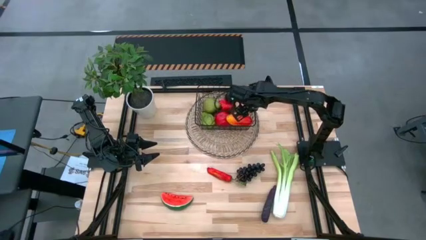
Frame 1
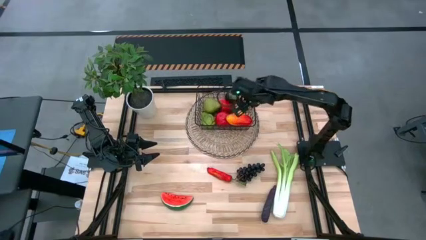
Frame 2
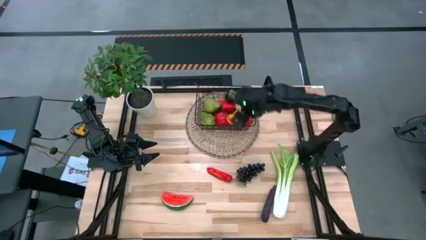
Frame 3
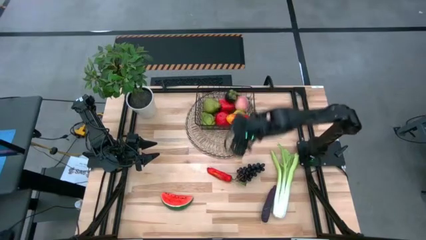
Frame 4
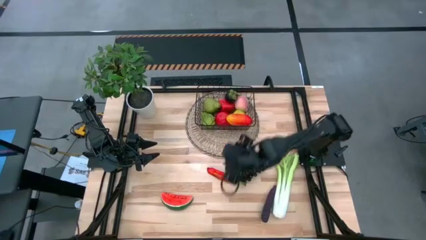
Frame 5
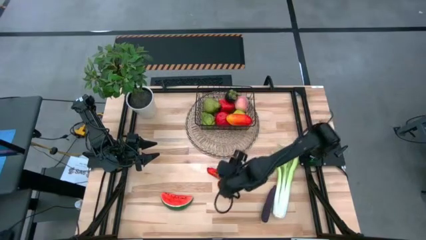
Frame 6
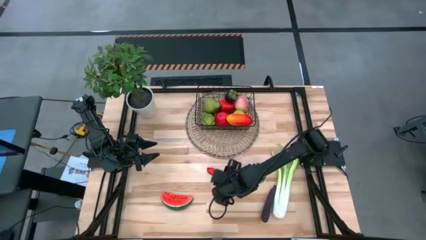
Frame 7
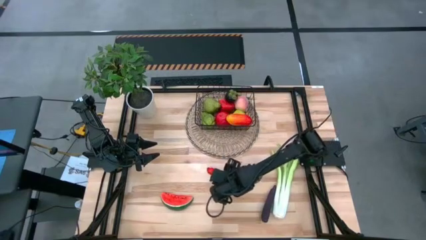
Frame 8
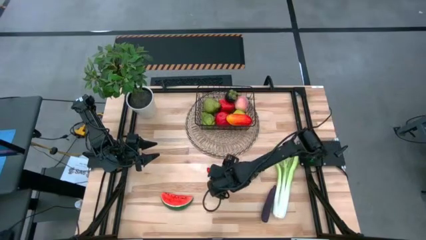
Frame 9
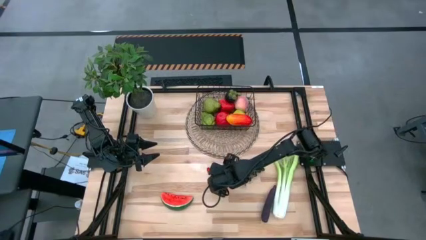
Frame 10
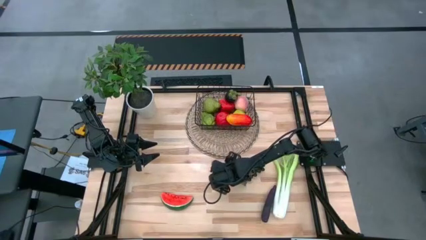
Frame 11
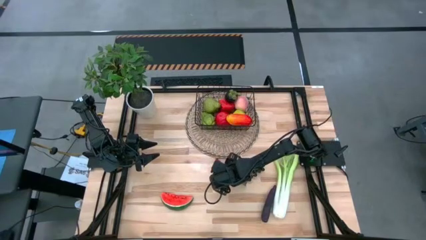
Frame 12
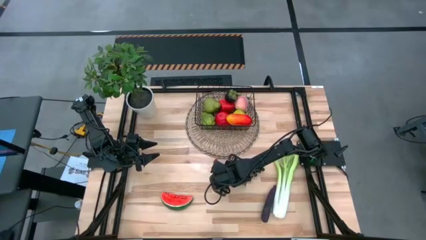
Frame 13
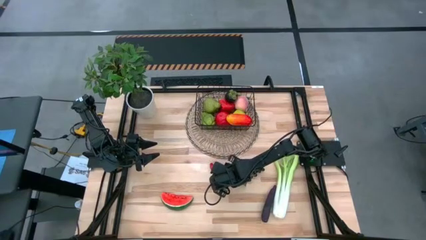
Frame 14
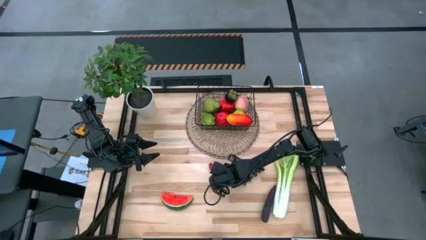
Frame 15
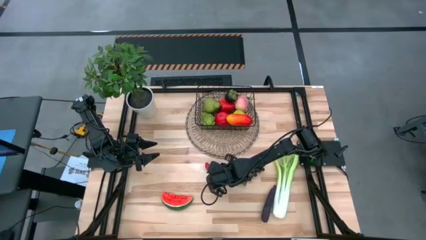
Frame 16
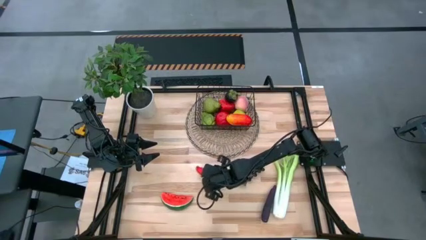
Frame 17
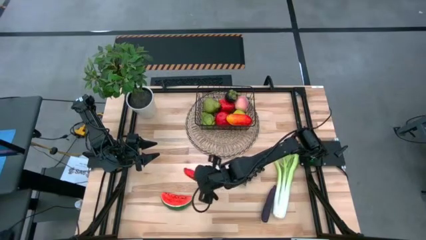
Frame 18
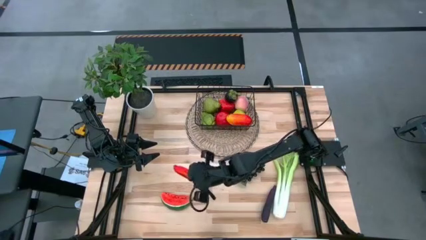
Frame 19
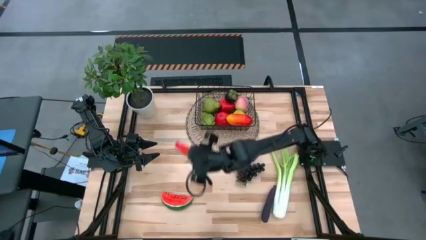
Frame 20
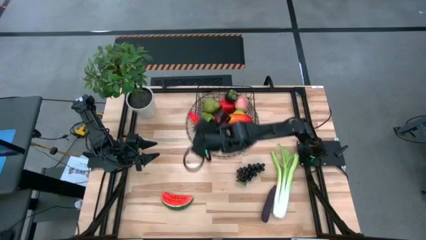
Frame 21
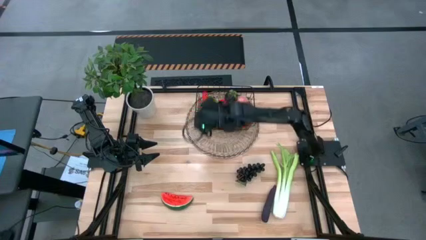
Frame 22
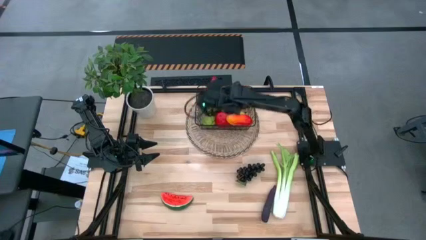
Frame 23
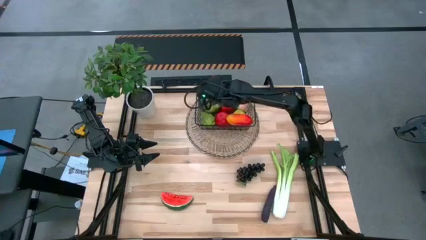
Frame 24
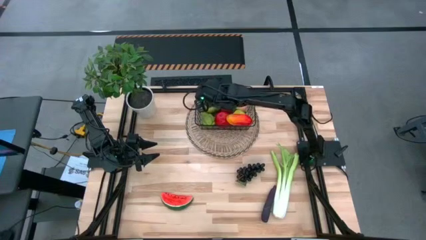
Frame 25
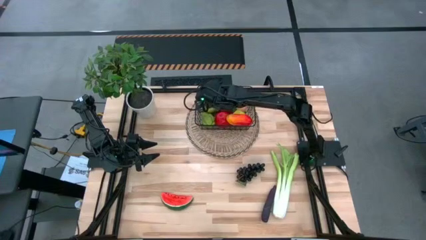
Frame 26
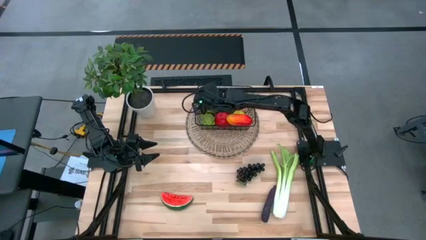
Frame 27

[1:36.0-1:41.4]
Task: Build produce basket
Put the red chili pepper into the black wire basket

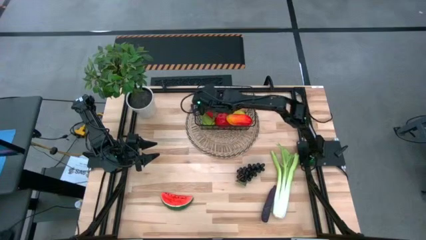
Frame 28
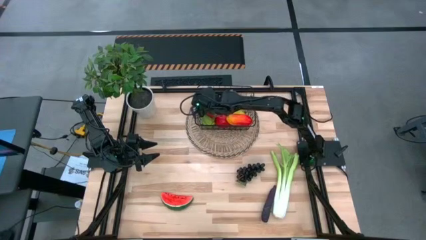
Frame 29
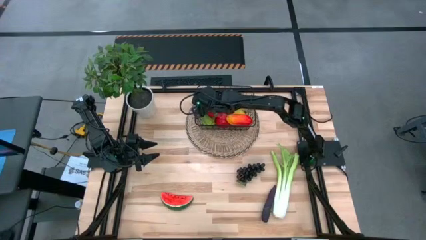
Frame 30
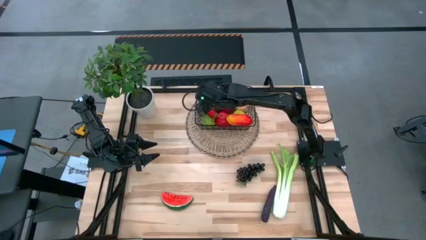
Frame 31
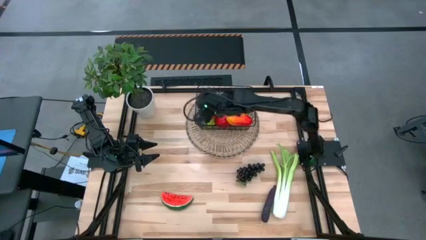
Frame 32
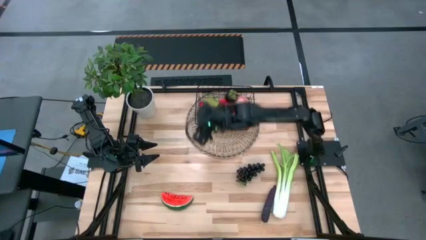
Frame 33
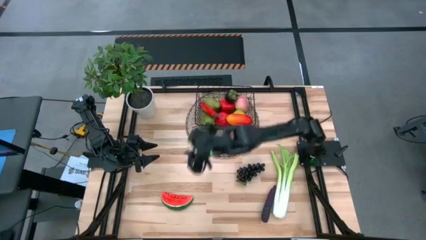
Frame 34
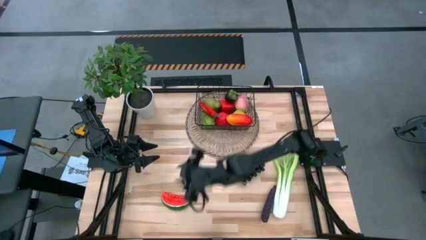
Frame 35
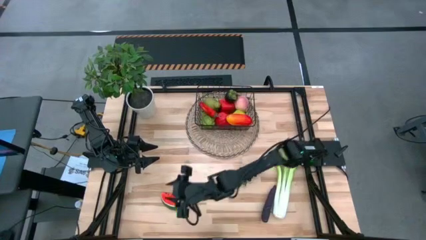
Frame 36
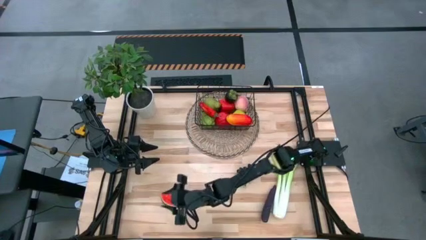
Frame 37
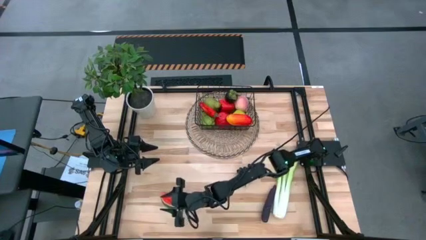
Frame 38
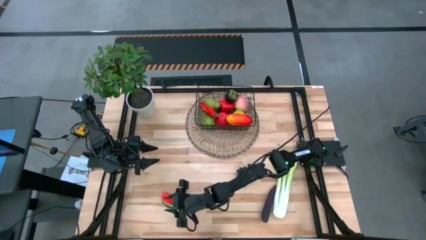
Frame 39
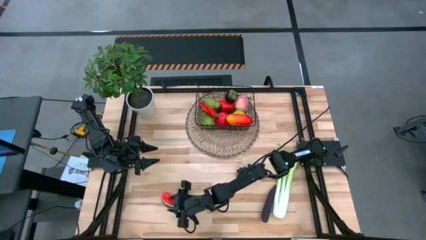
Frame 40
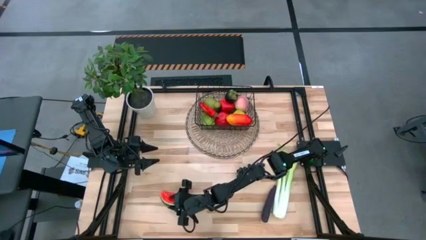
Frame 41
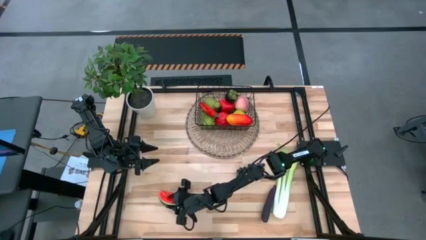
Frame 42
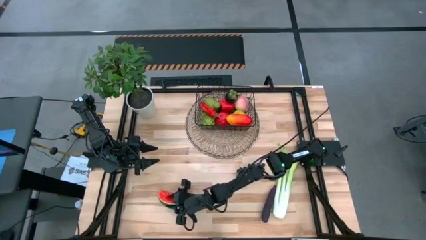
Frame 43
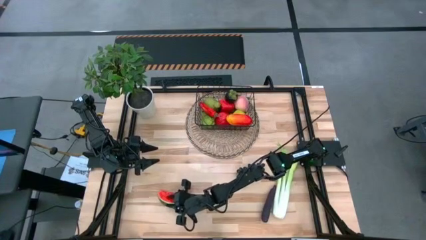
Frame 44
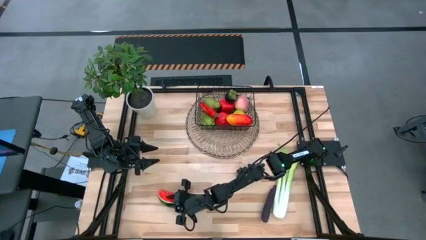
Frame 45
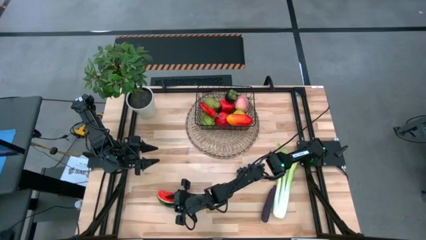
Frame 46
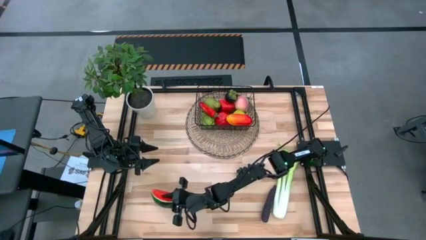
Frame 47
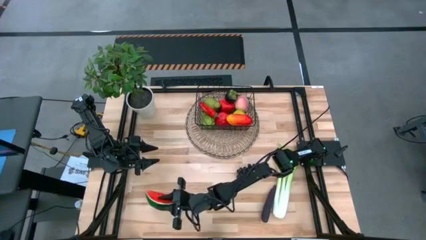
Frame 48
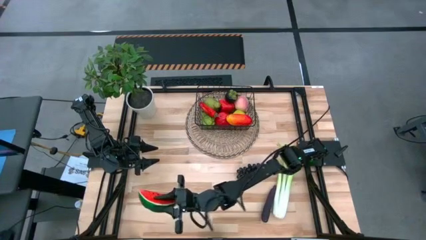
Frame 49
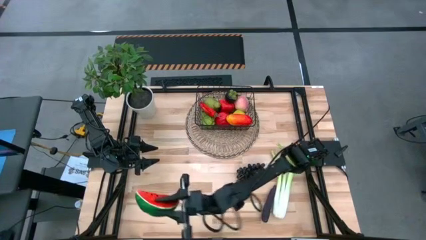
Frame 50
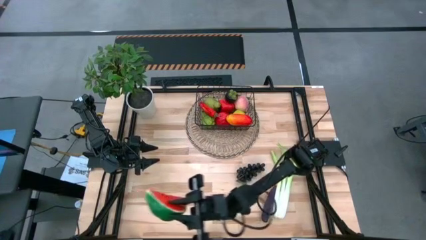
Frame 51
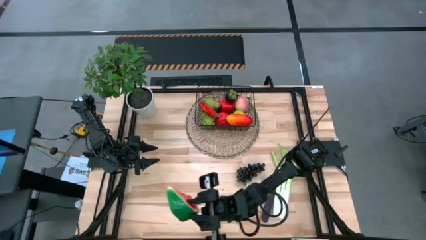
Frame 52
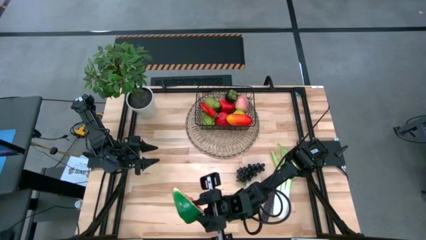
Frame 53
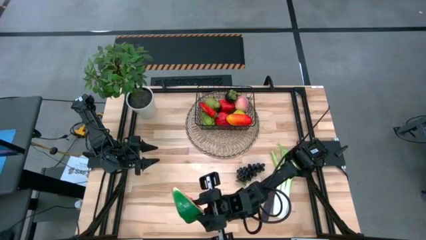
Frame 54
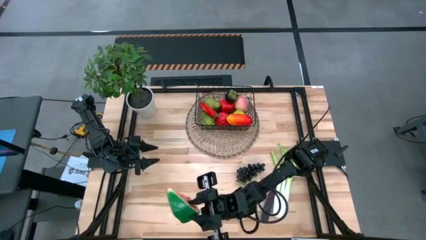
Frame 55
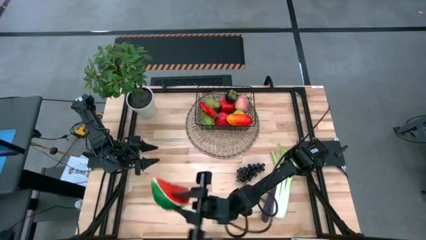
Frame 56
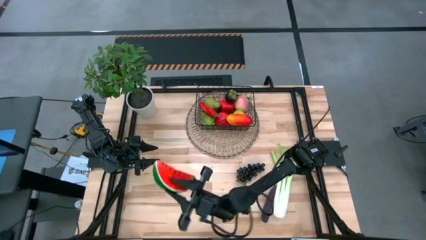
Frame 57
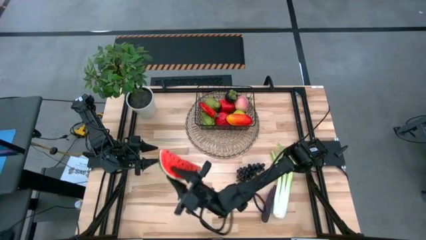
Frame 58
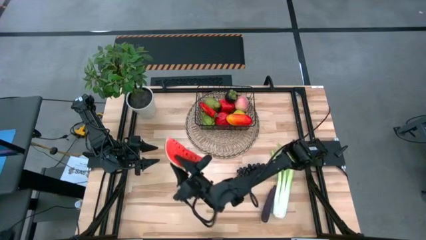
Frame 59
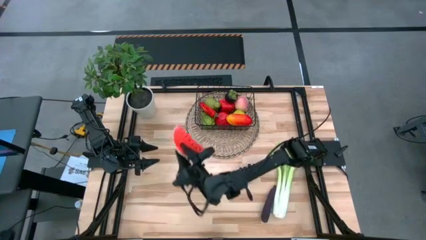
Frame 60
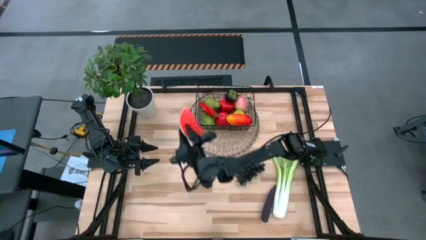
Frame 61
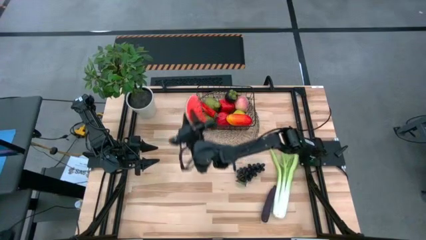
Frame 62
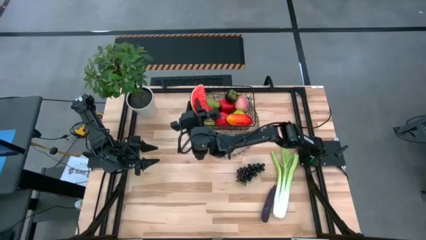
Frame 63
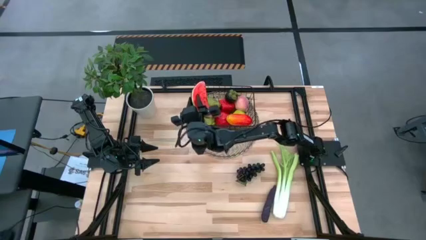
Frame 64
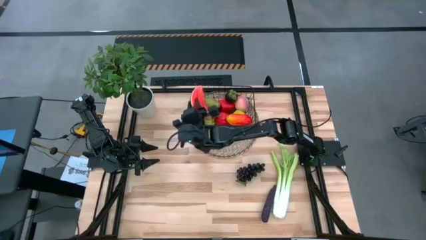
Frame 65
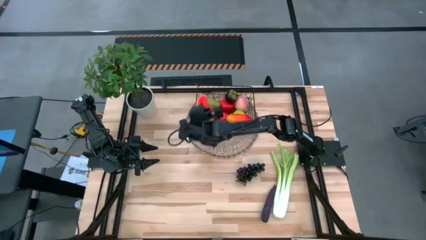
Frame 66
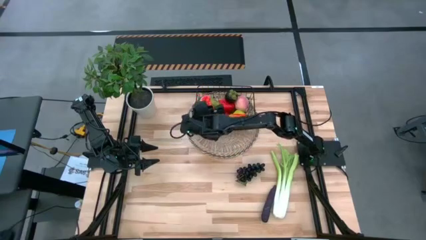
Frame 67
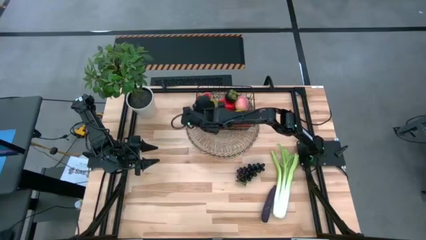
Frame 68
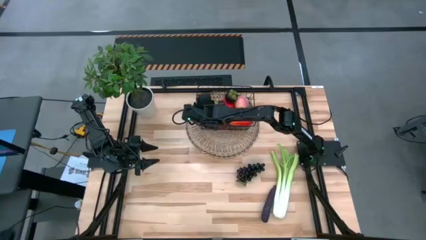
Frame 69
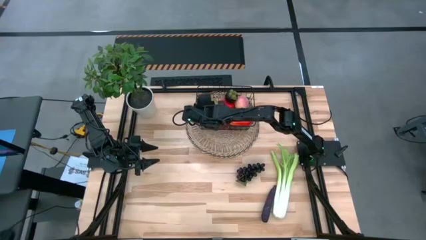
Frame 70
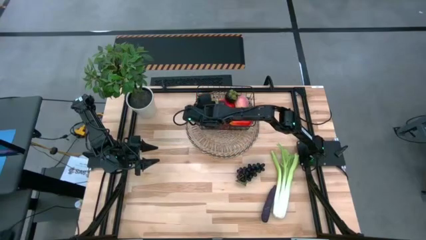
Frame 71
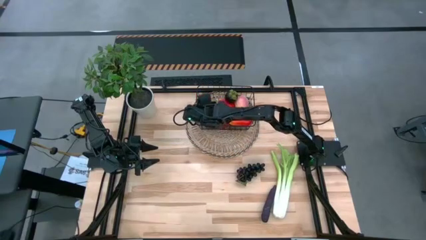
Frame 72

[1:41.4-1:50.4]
Put the orange watermelon into the black wire basket
